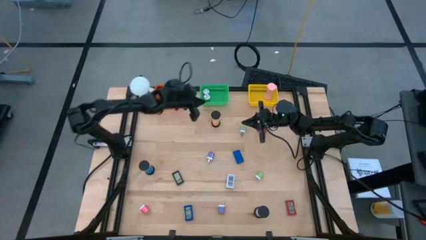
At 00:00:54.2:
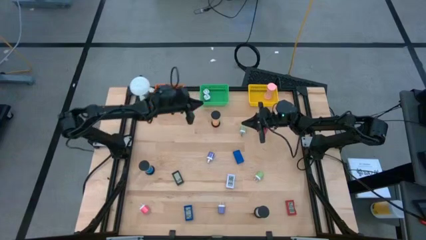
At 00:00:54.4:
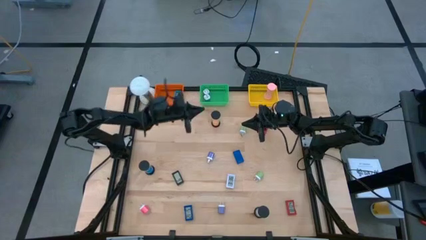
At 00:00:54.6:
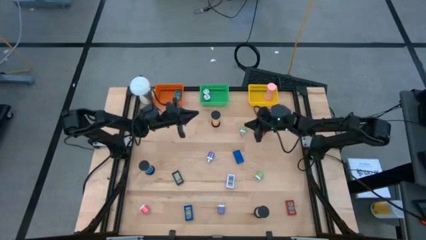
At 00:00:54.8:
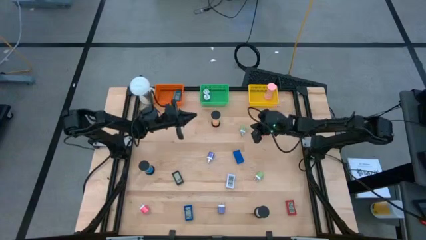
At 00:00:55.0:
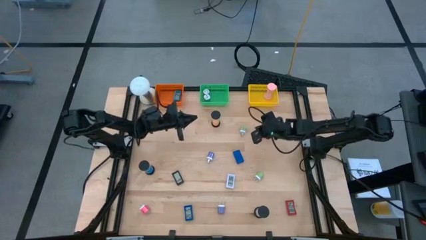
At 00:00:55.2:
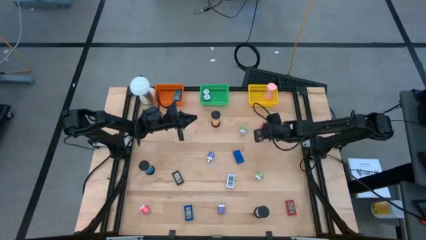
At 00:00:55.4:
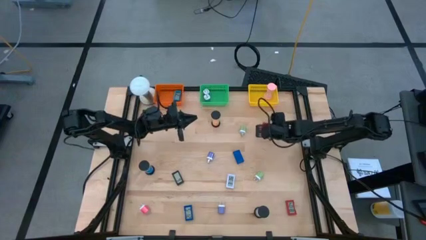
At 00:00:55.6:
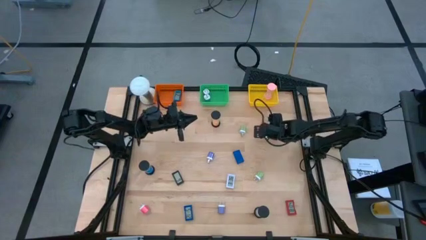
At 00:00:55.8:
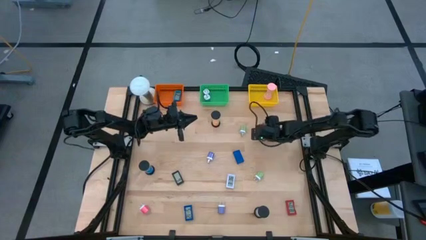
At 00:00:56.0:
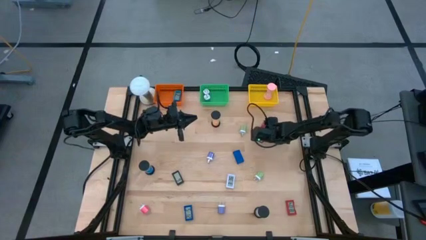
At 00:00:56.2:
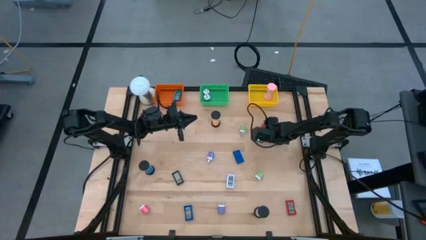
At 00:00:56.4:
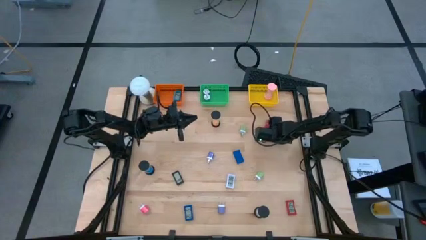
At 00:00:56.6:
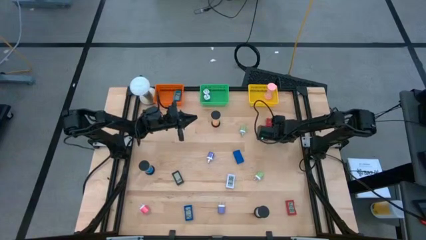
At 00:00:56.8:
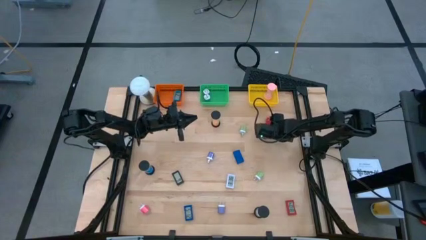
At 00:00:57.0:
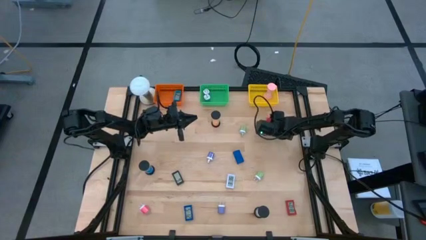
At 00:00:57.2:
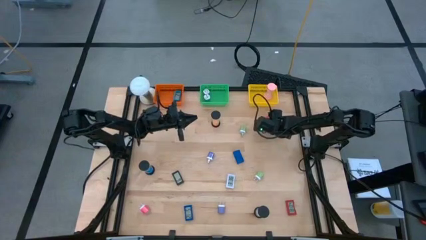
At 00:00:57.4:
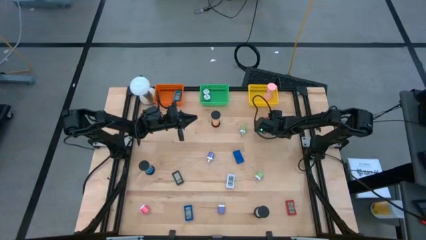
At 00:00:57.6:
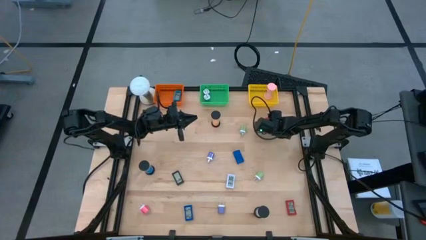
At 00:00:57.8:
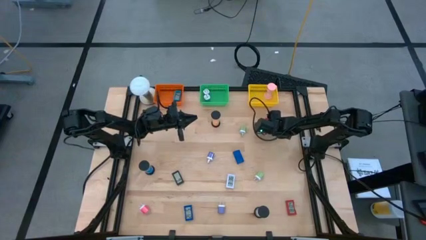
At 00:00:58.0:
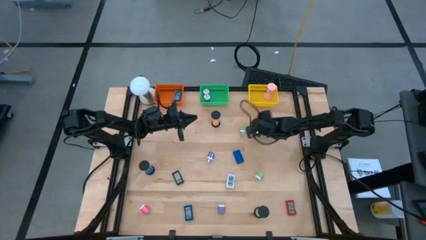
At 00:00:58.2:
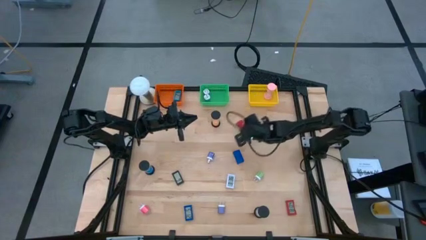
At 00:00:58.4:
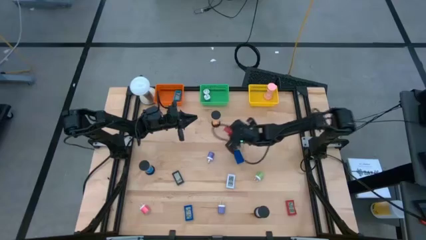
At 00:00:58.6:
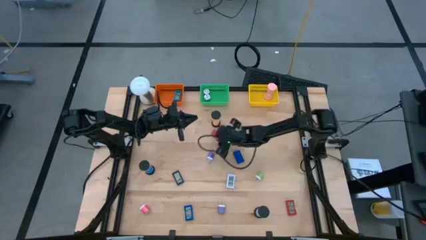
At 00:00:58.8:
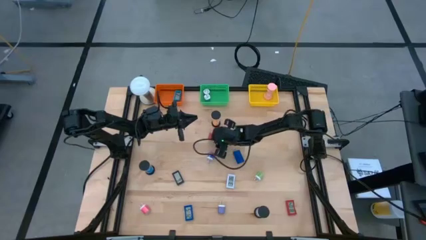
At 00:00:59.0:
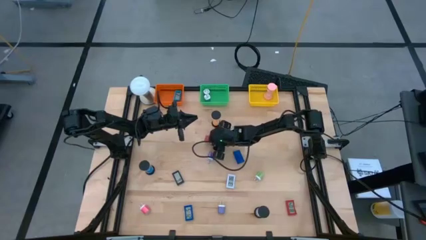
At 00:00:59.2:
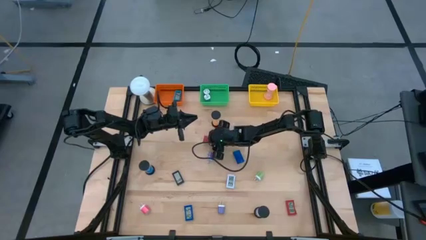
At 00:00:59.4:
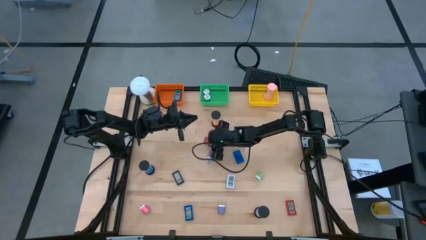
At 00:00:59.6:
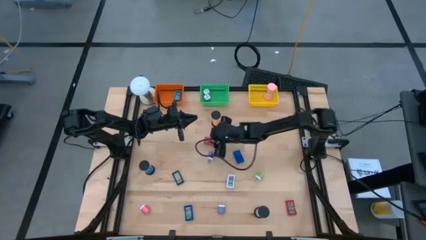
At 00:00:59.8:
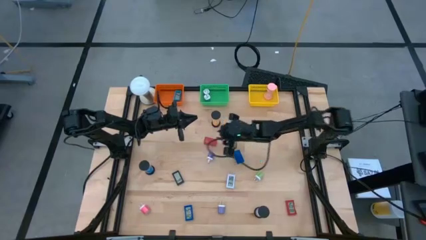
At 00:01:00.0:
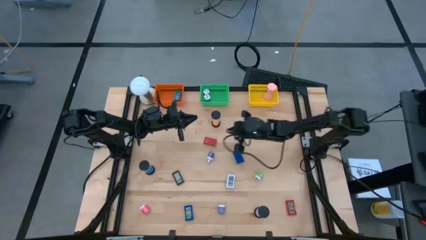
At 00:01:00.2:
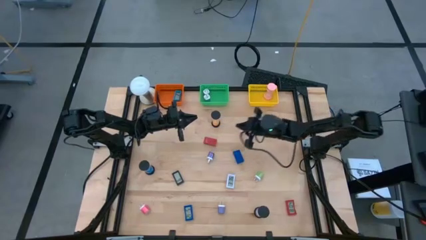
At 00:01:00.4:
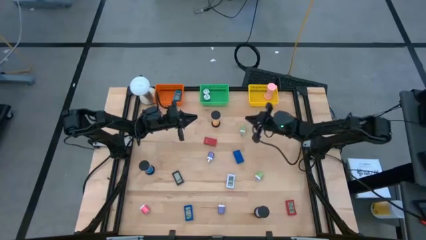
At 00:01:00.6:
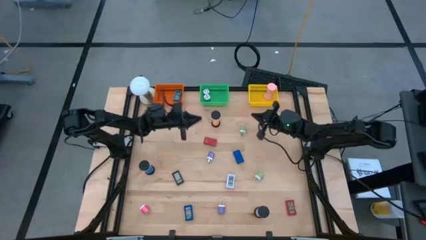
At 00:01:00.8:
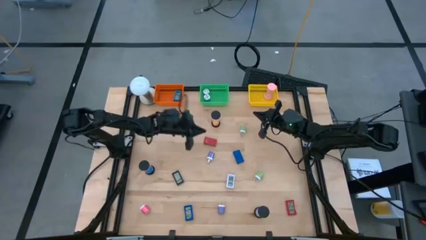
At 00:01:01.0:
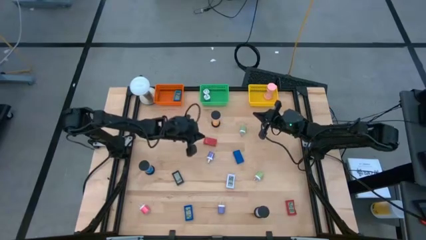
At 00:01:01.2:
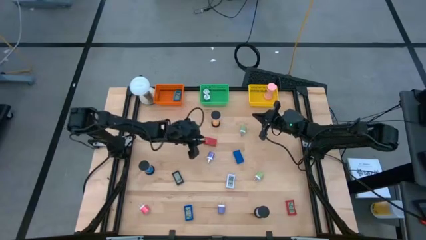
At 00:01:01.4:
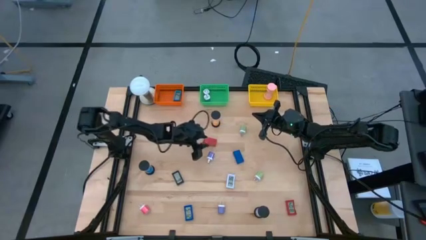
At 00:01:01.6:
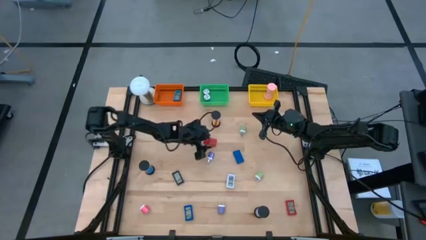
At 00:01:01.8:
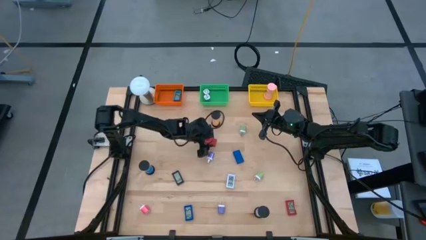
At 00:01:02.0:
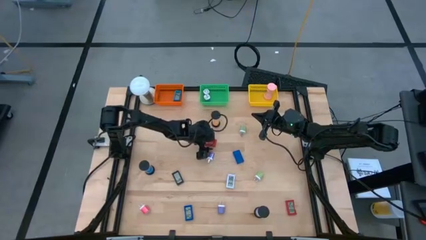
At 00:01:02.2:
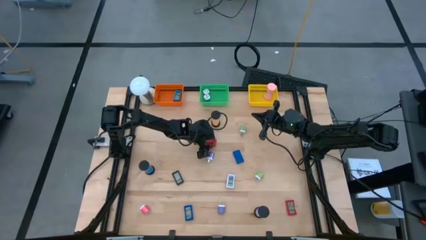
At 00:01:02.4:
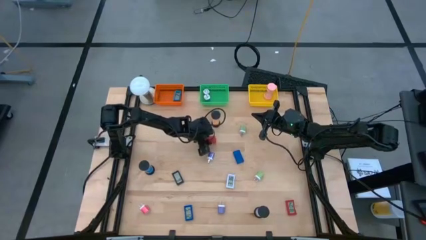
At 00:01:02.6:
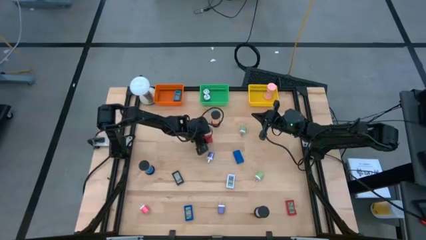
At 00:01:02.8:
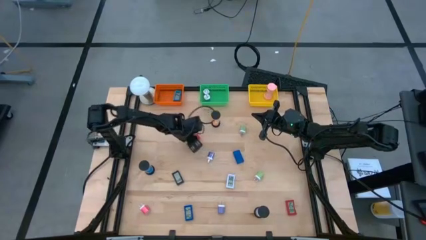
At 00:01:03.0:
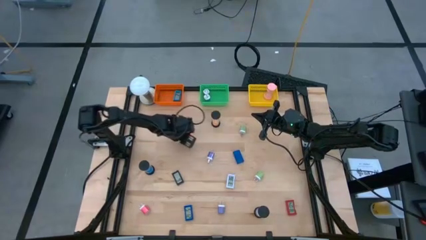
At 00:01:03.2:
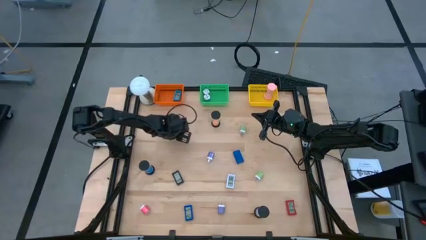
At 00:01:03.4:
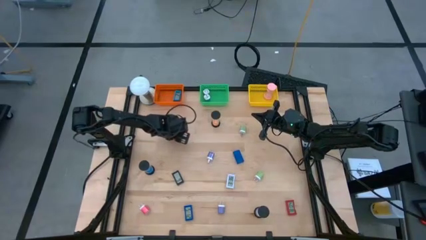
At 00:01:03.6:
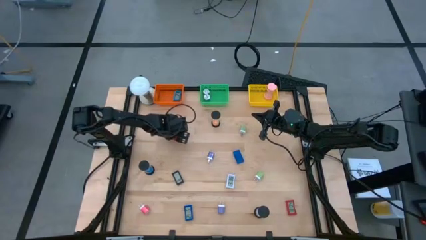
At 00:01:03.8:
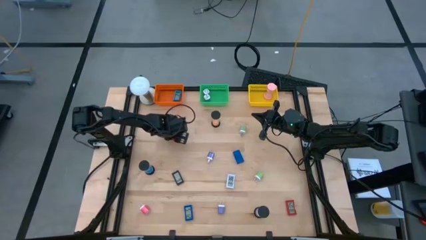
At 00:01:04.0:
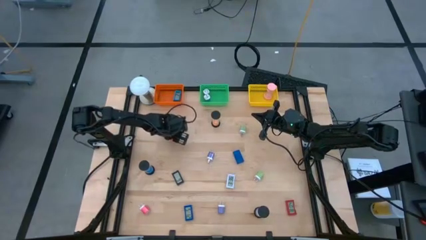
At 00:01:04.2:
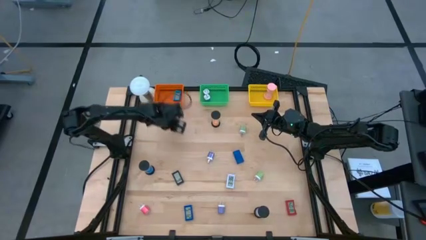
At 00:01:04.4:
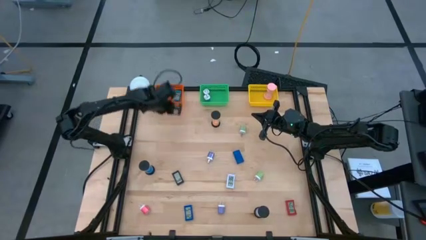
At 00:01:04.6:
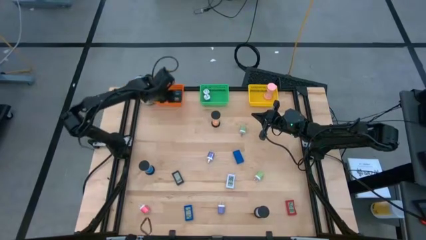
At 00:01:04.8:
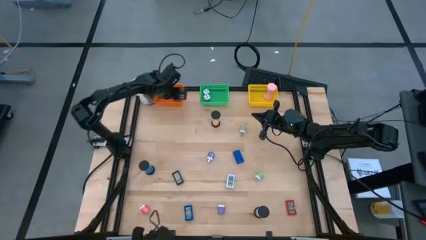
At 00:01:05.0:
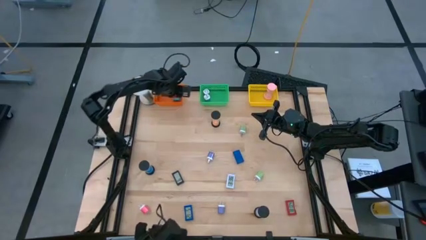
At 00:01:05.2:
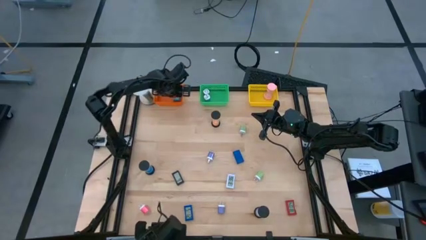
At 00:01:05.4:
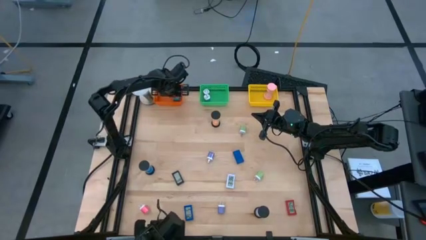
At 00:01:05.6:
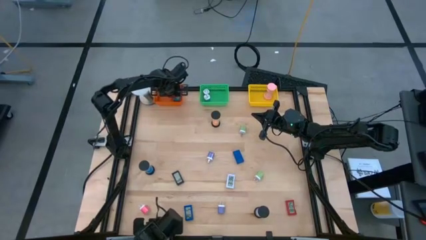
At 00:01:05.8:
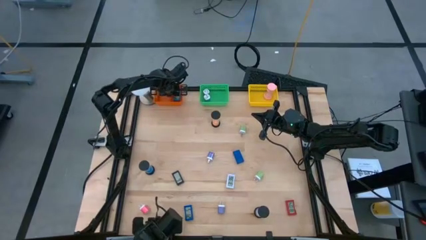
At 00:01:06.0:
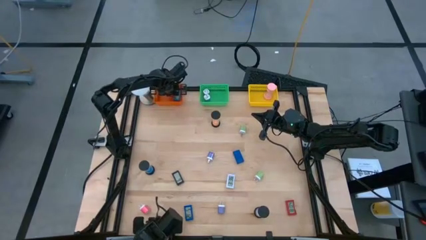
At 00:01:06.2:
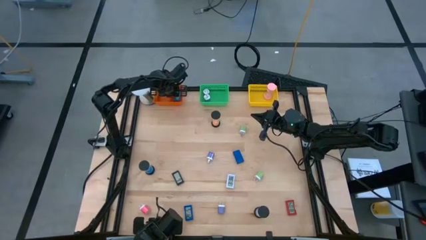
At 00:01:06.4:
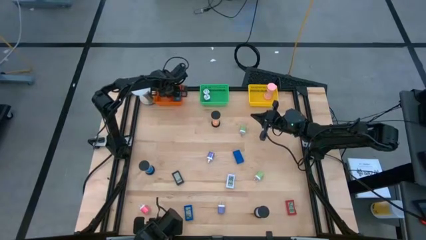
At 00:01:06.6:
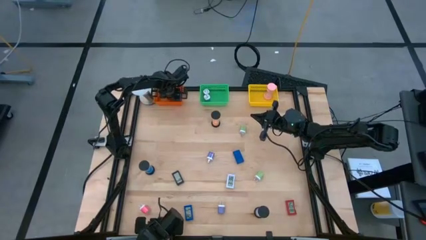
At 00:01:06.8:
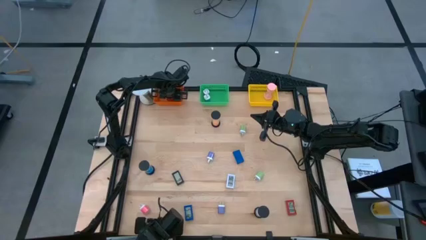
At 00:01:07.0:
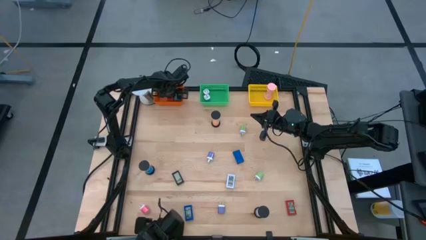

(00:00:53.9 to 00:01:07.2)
Task: Pick & Place Office items
Put the red digital clock into the orange basket
